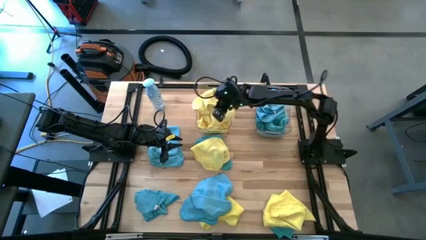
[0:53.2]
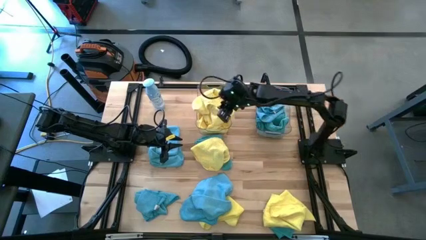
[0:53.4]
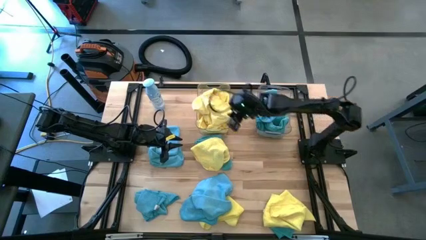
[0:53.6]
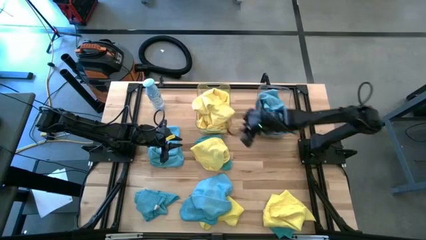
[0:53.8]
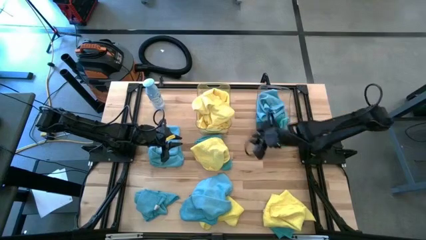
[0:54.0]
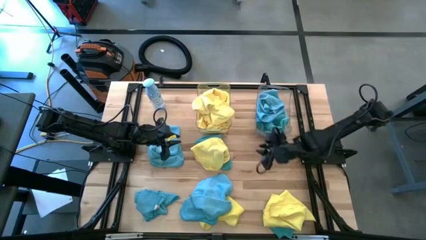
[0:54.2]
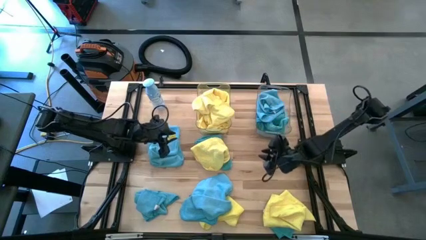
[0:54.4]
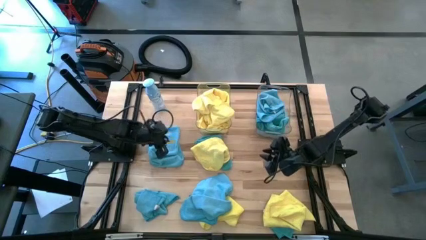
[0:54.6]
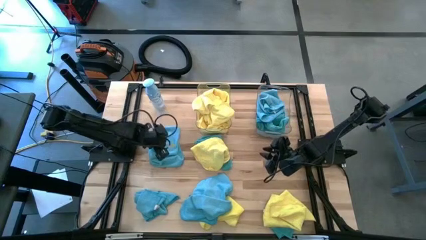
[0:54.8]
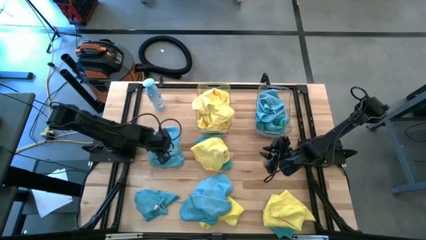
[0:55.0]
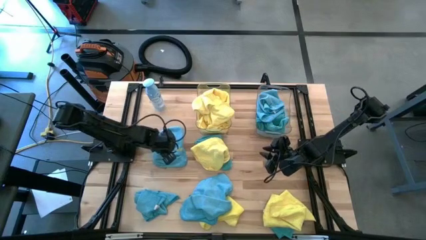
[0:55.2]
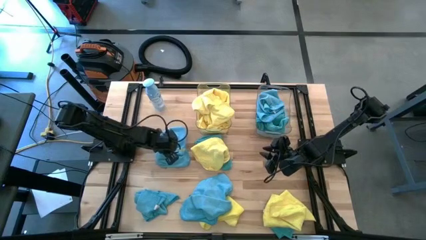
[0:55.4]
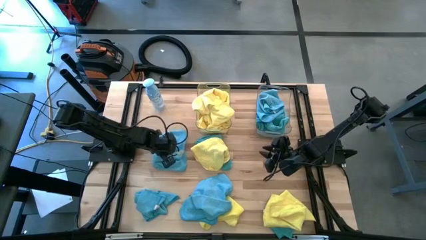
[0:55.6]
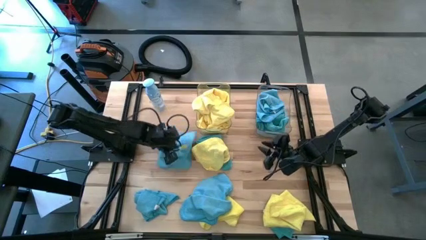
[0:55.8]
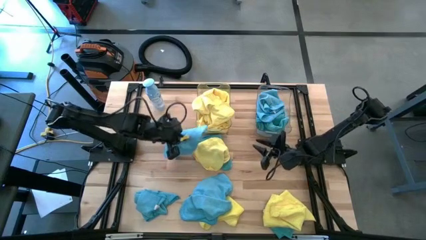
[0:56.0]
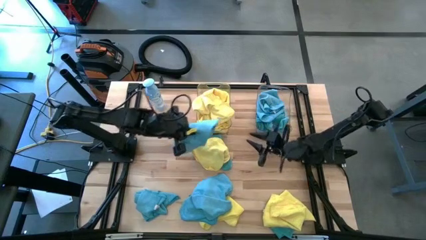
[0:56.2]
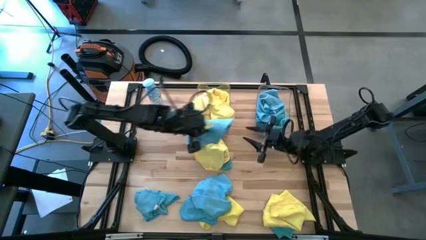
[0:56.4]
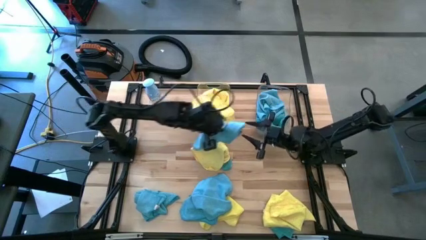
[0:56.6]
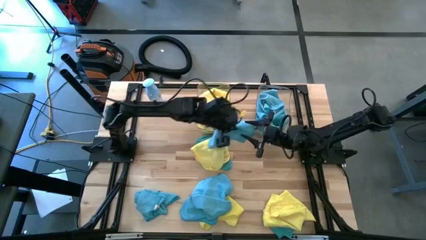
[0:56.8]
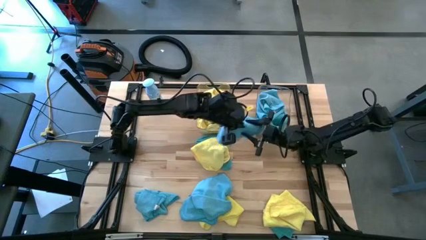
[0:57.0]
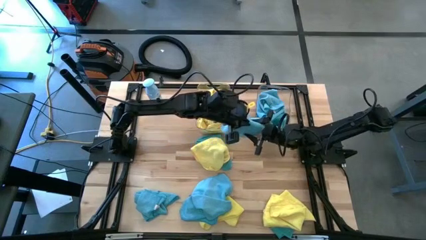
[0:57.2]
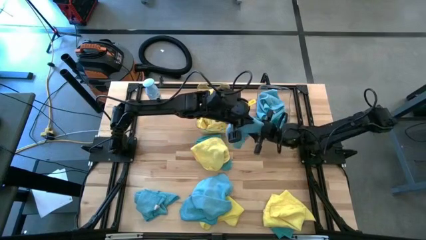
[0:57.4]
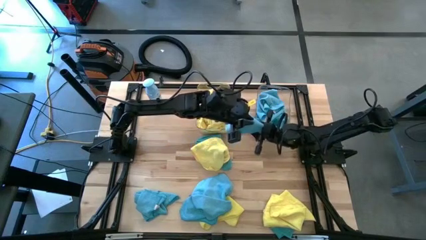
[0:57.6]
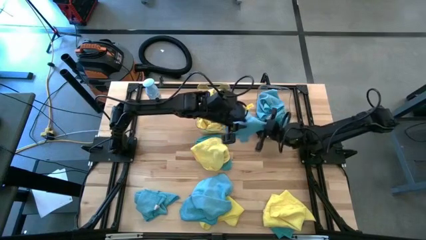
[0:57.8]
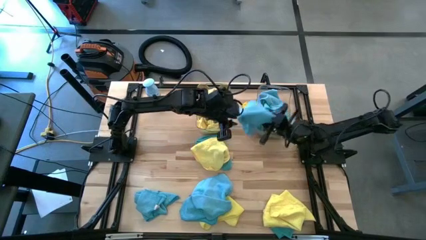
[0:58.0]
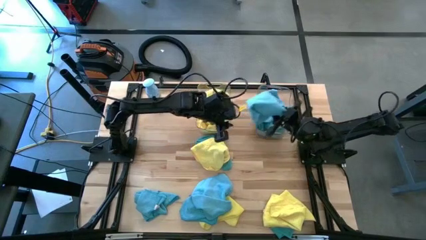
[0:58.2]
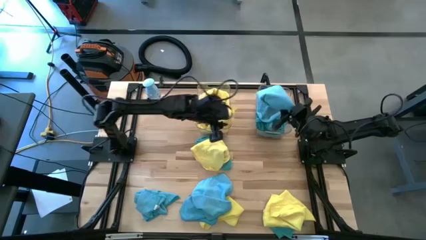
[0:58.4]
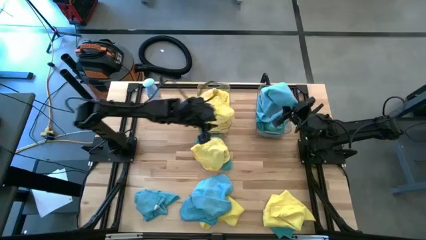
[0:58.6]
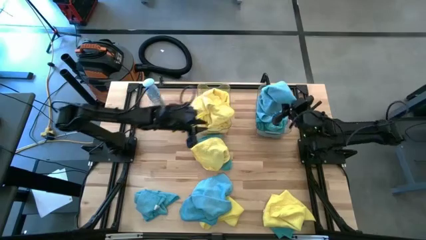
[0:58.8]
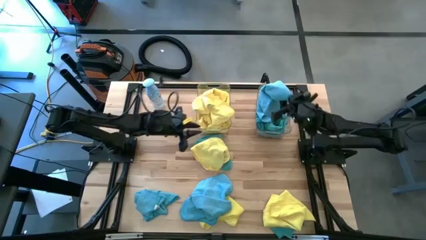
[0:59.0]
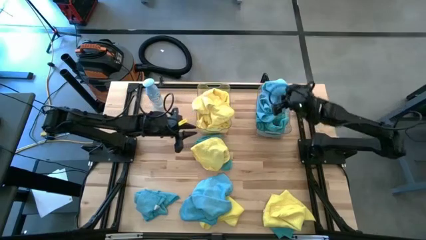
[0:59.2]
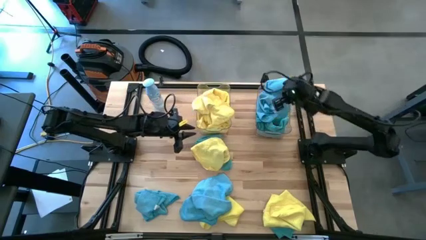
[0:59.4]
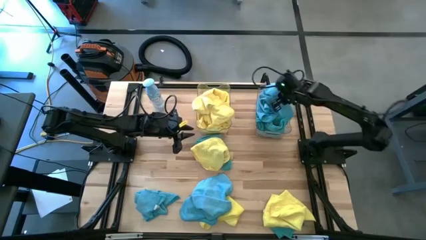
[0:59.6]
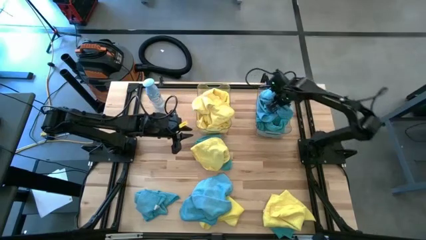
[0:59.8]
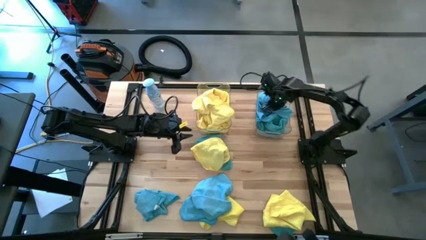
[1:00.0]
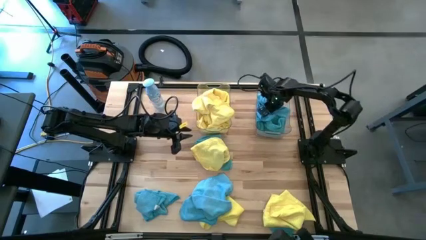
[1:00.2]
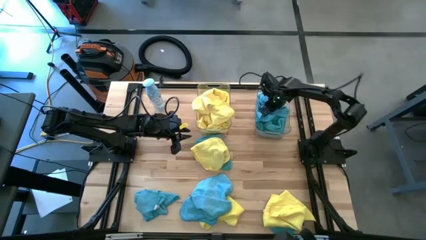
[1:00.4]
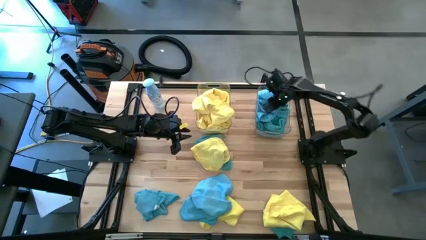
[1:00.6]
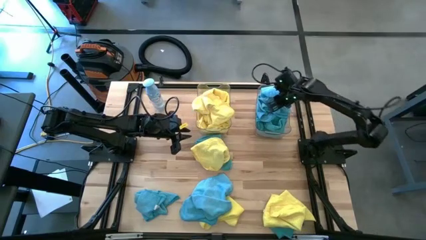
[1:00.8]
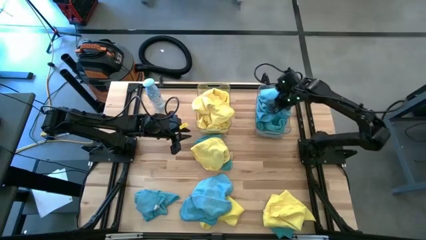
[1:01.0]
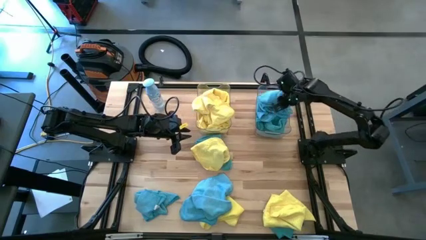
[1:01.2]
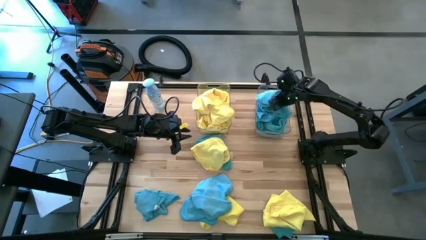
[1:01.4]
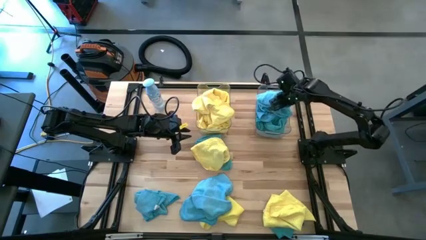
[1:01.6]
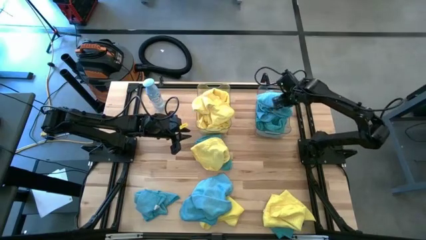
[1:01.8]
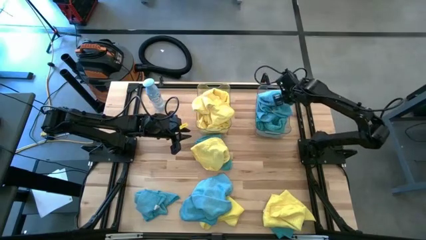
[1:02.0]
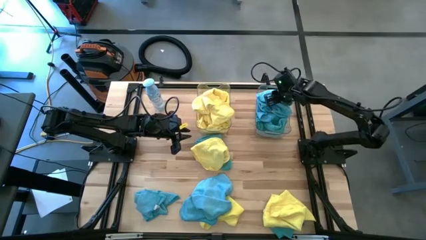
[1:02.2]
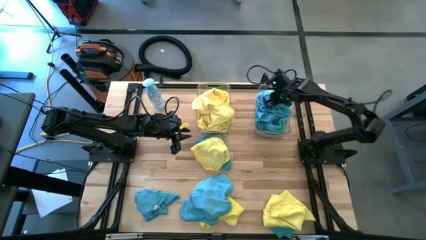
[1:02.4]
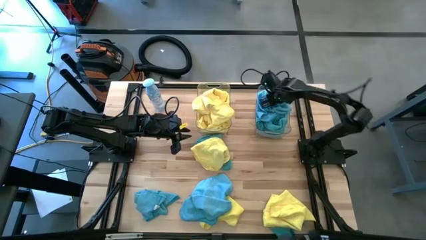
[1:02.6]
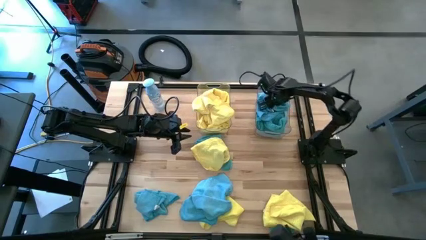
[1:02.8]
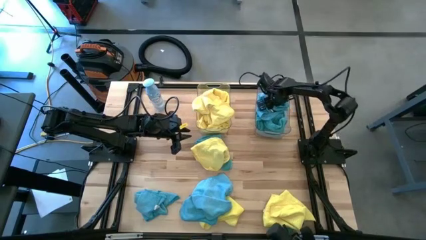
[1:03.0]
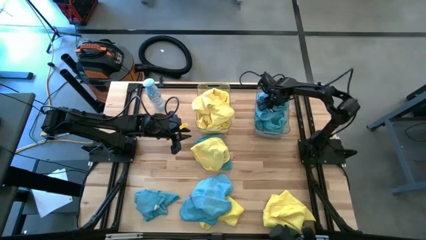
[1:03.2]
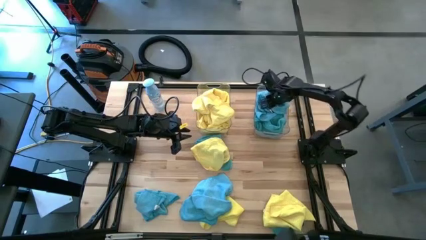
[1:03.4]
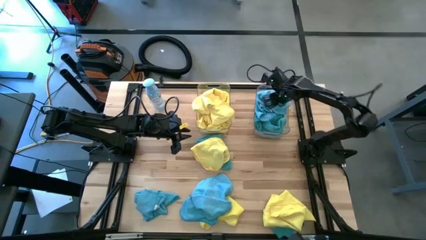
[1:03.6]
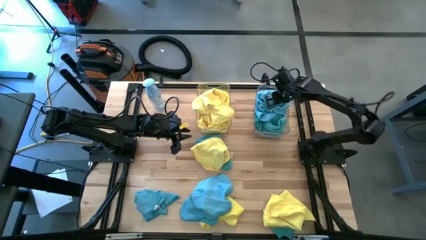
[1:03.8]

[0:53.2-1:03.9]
Task: Sort microfiber towel by color & place in baskets
Put the blue towel into the right transparent bin

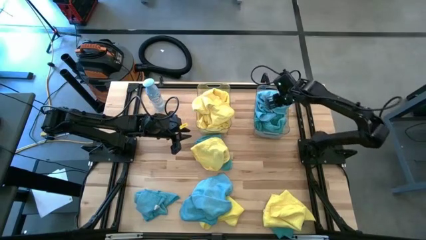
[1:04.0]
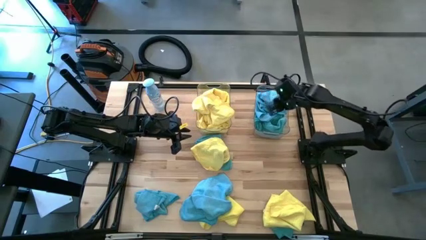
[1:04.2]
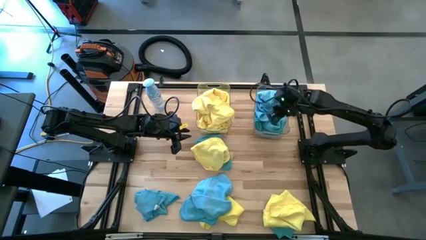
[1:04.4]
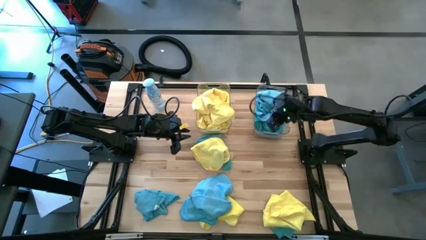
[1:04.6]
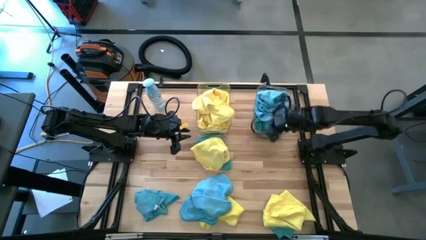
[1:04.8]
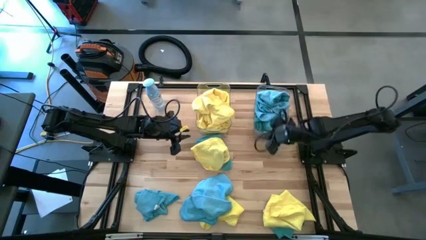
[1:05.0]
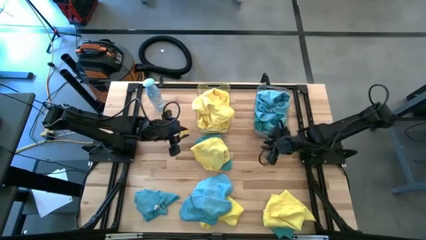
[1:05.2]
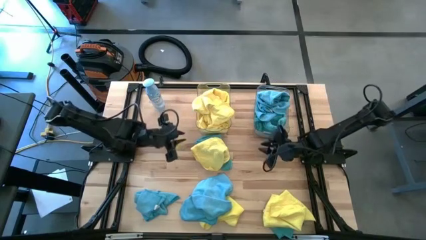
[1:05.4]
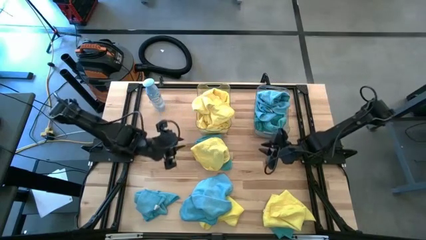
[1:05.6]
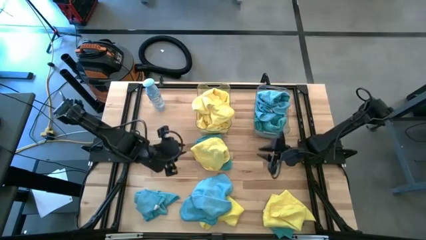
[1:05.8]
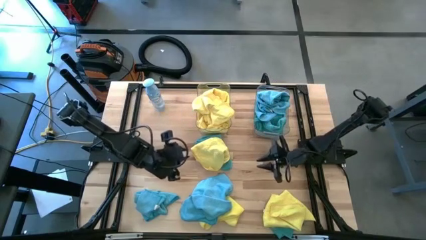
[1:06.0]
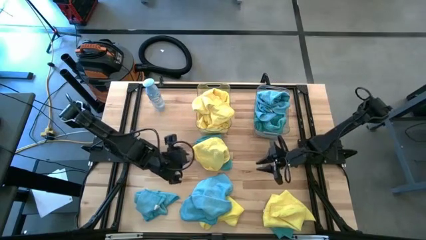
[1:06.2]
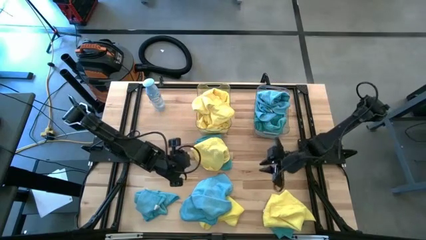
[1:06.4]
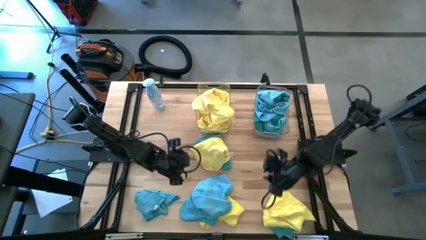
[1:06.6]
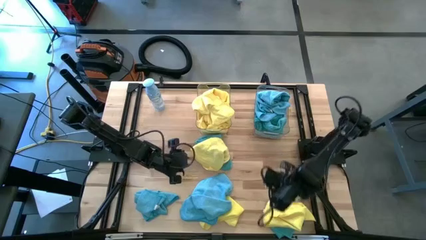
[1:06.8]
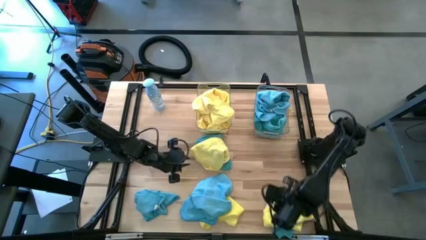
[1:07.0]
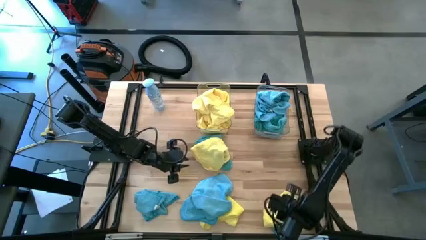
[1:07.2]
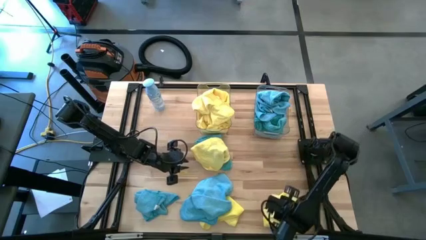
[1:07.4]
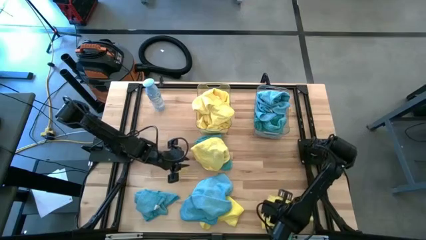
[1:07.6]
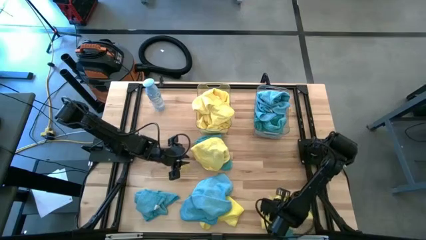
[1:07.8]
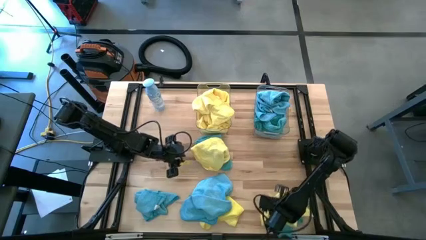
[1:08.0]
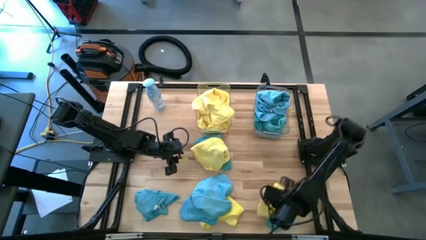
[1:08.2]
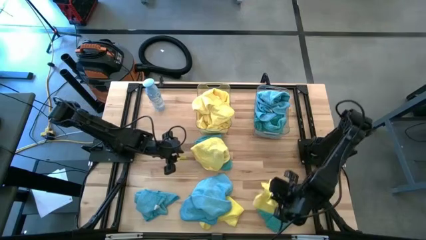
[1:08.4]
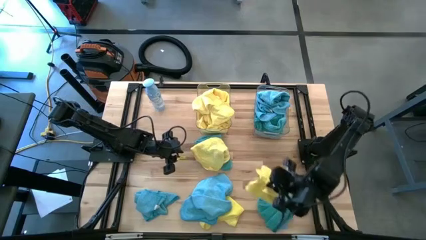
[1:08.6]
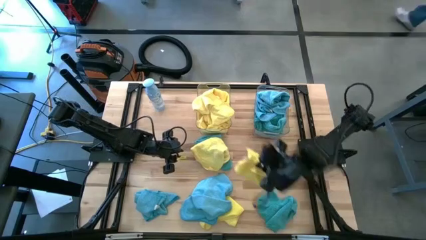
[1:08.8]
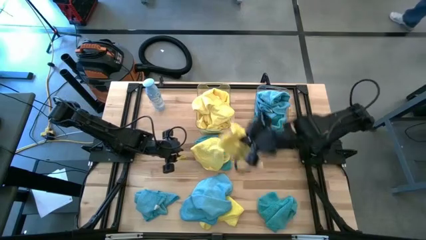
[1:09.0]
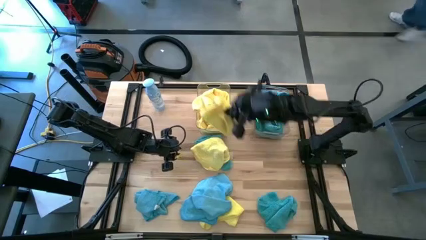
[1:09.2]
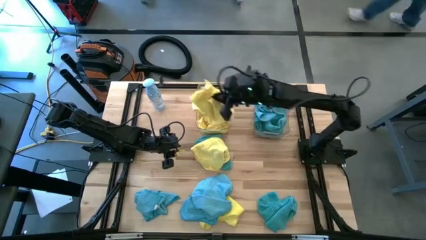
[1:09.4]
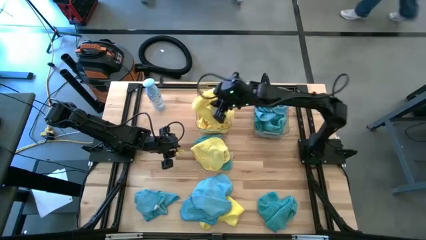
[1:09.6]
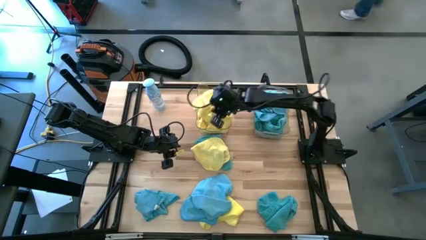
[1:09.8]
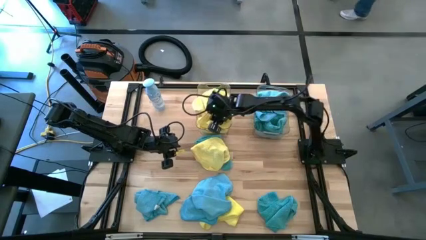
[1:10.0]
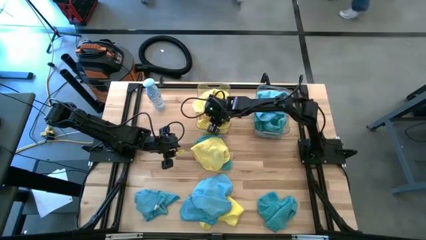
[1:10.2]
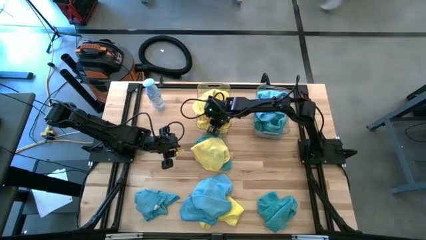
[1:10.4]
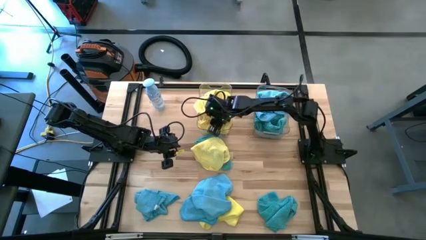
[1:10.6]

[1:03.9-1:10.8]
Put the yellow towel into the left transparent bin
